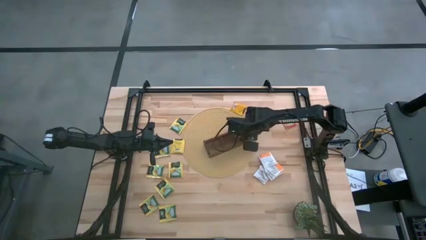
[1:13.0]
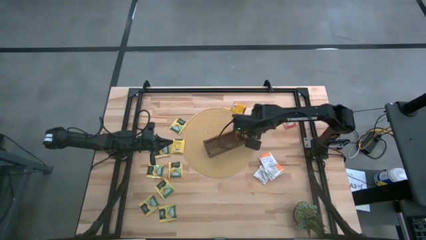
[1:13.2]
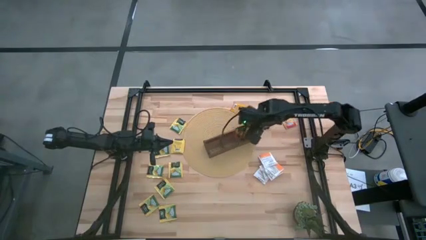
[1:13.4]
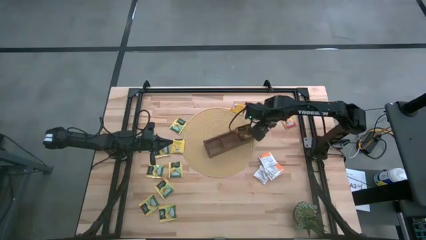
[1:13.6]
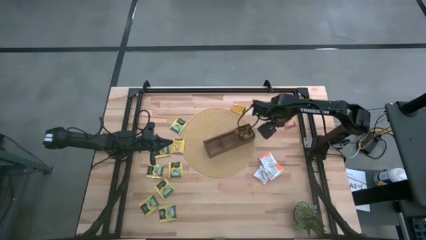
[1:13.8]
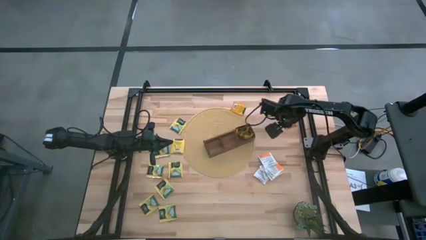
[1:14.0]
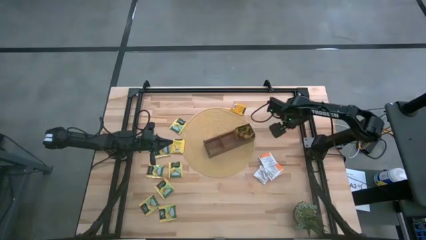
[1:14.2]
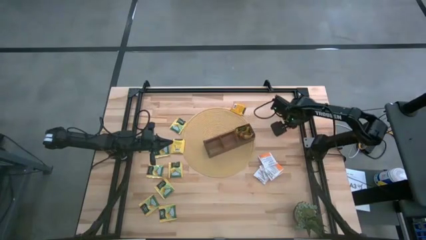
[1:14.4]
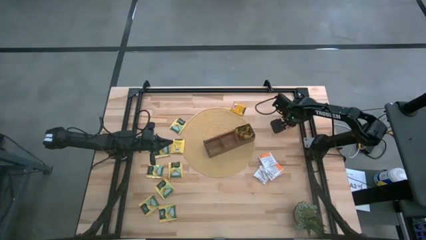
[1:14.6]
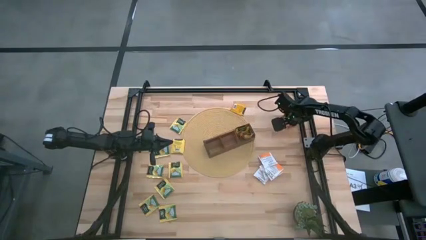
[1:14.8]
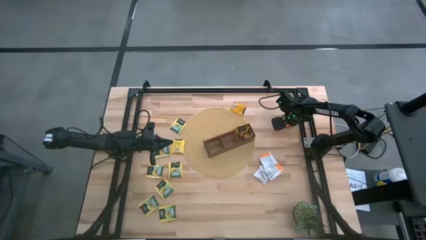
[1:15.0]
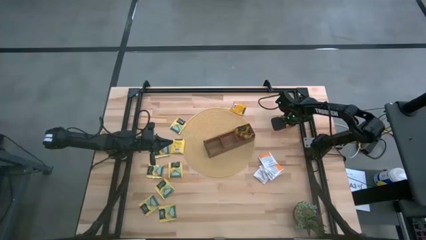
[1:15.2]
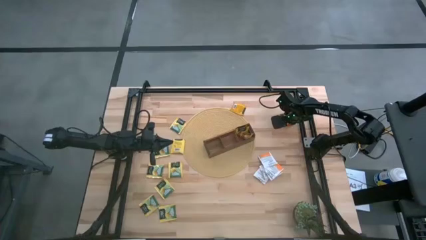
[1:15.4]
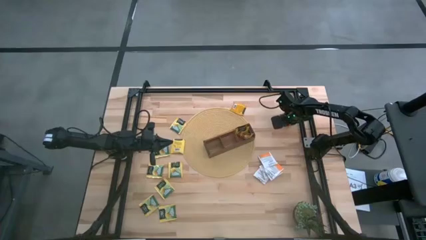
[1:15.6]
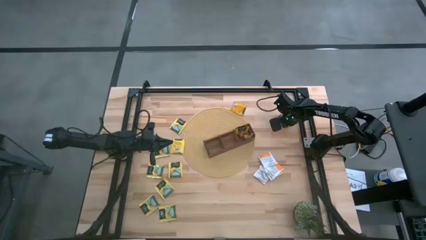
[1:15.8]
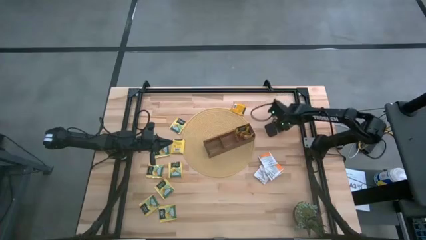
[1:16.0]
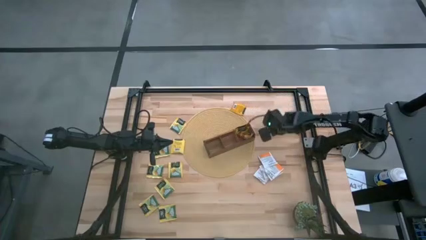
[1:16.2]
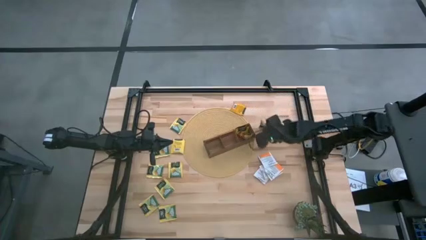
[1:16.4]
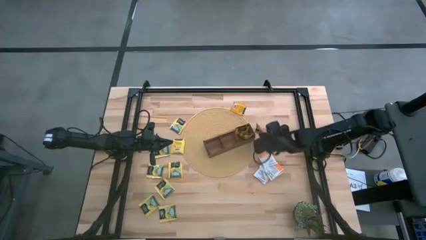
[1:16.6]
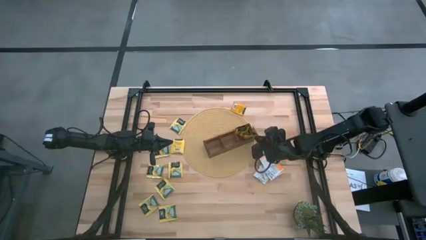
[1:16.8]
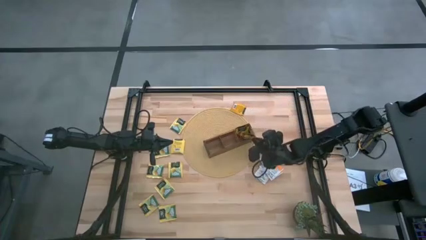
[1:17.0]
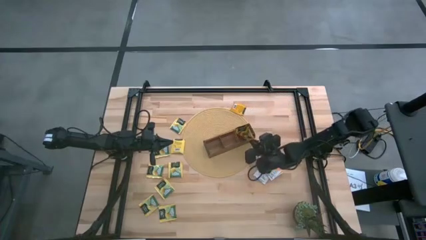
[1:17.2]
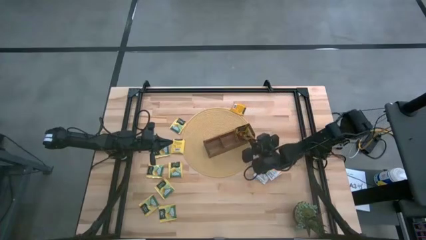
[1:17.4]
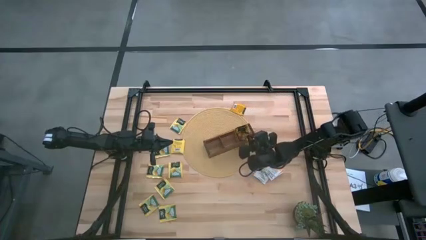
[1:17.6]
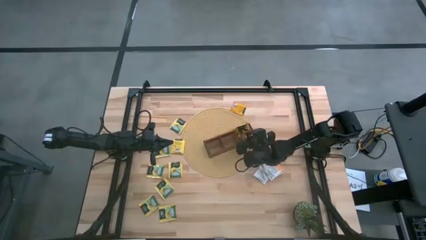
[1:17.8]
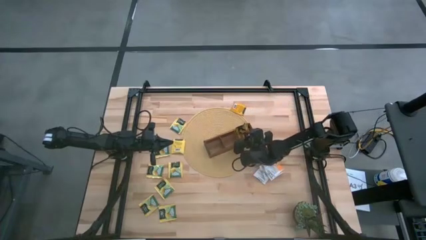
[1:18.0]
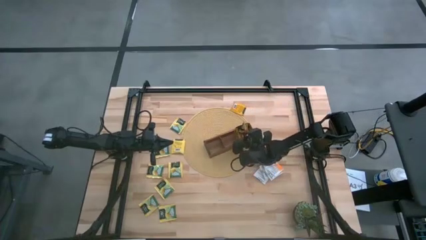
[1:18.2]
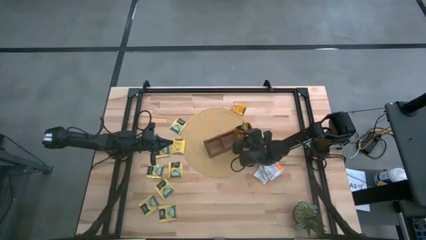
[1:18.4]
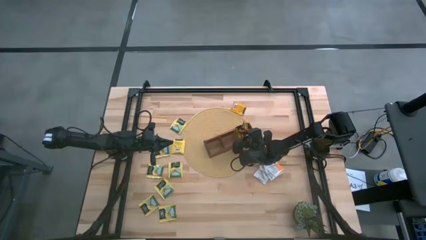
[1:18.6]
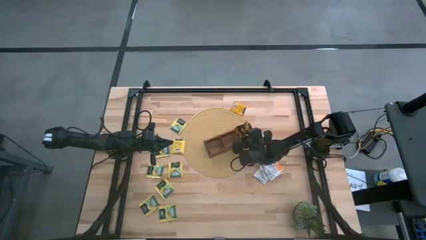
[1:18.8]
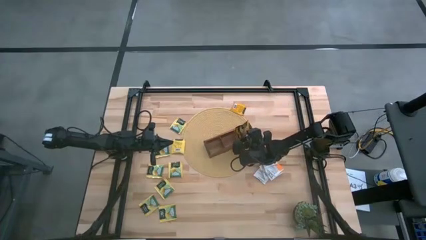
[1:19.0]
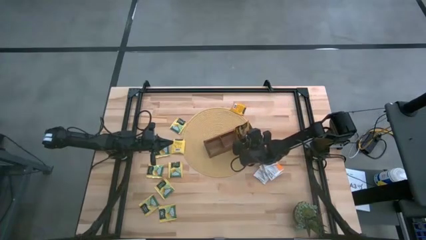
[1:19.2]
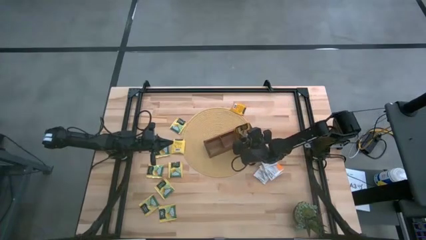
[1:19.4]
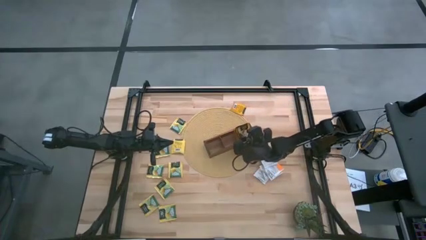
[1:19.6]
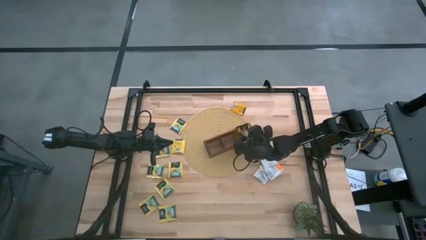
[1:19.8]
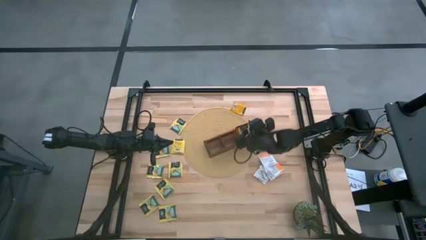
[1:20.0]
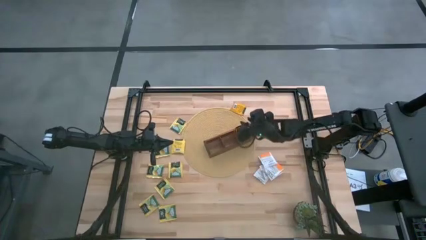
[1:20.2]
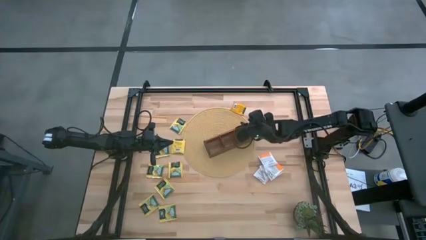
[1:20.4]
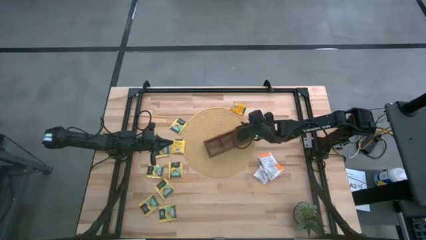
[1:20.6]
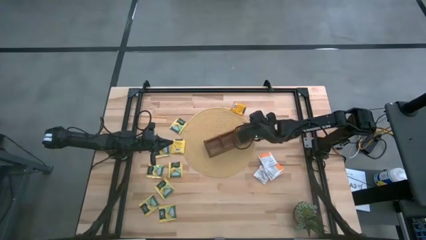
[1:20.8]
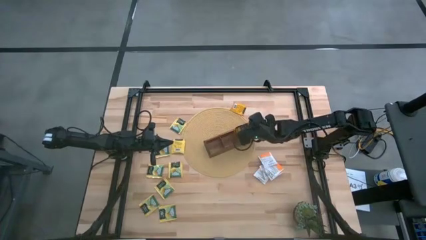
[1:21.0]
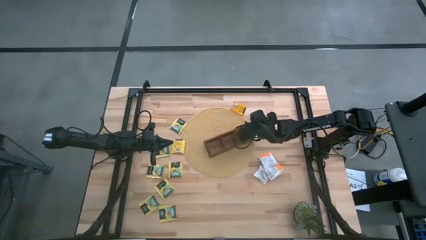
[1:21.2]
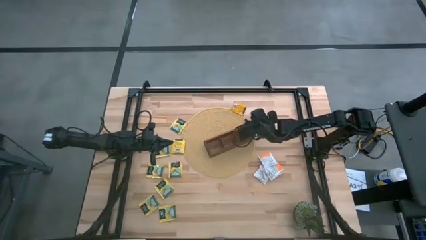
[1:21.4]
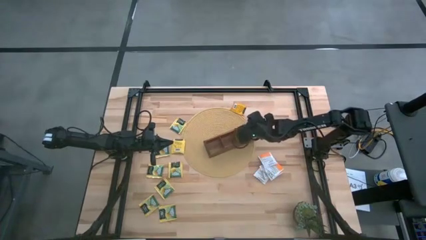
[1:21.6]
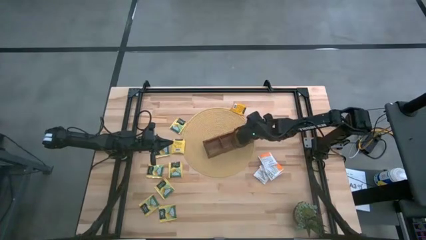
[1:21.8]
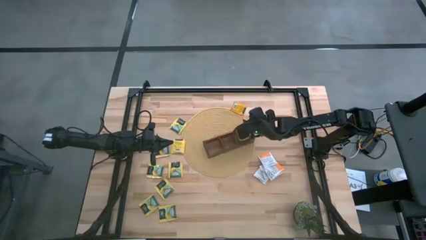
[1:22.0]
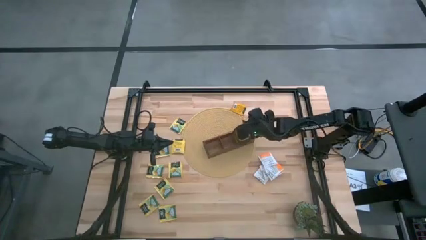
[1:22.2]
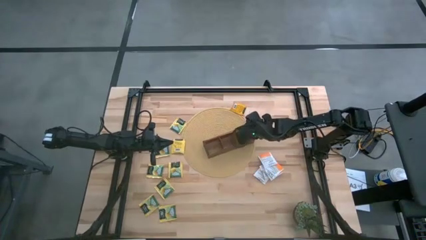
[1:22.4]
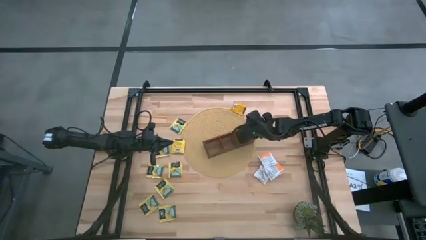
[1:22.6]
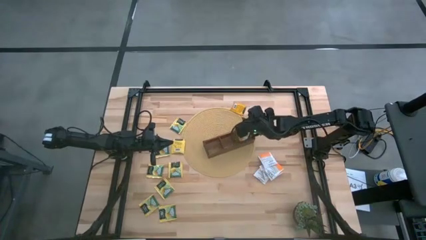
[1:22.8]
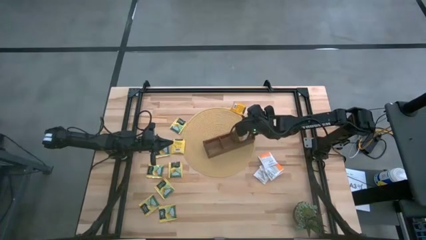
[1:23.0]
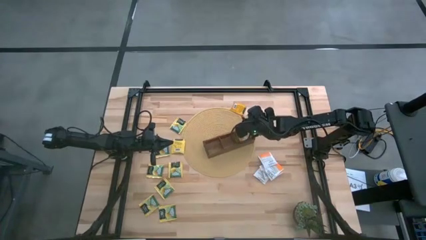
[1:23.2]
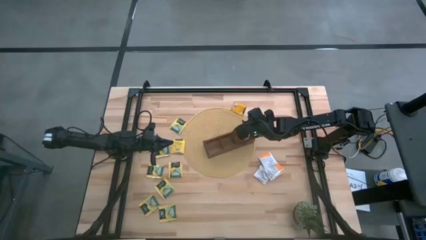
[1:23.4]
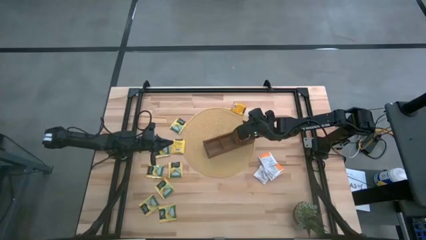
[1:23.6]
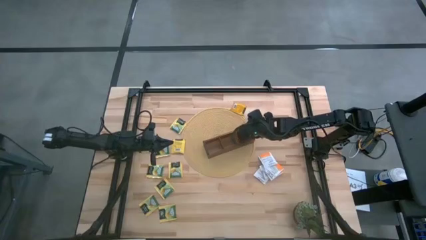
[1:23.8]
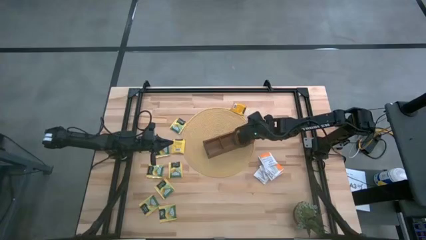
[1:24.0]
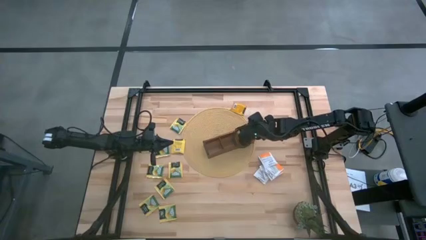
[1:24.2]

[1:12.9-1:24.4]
Task: Pick & Place Tea
Put the orange tea bag into the right section of the wooden organizer
